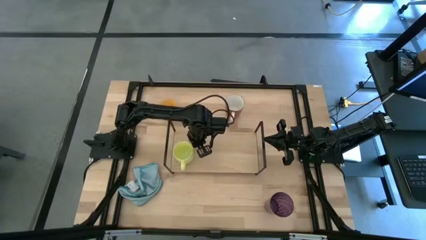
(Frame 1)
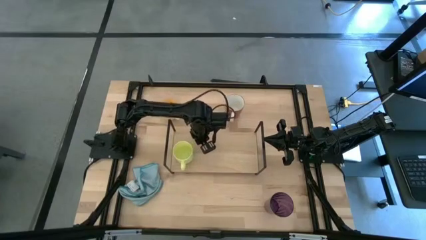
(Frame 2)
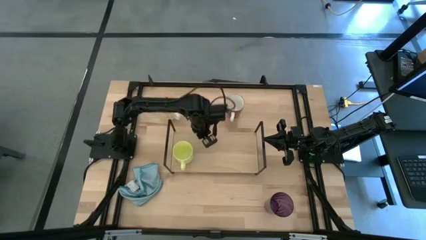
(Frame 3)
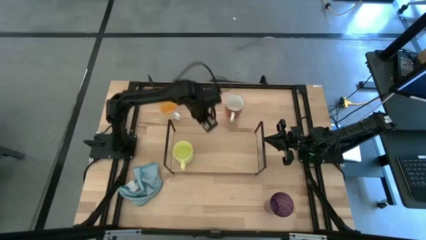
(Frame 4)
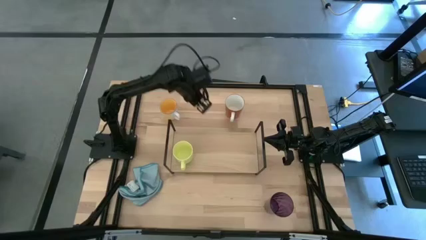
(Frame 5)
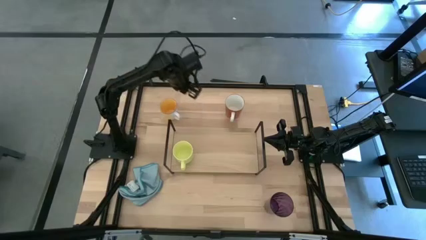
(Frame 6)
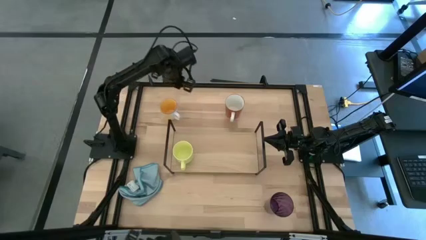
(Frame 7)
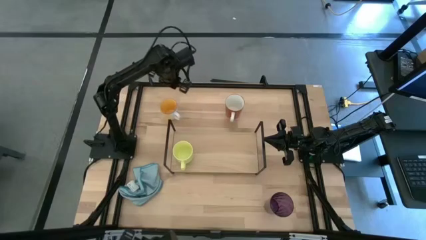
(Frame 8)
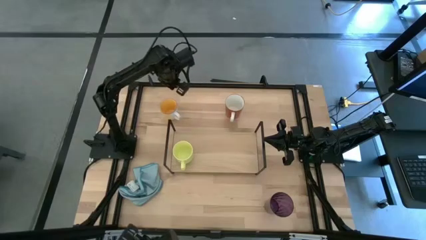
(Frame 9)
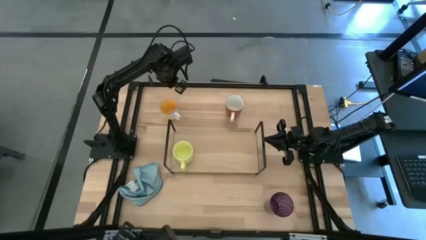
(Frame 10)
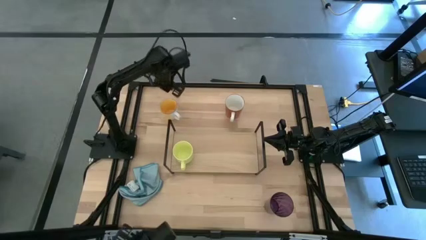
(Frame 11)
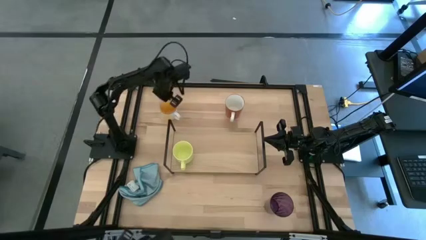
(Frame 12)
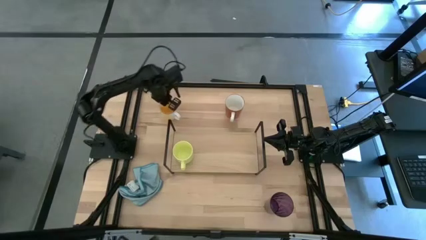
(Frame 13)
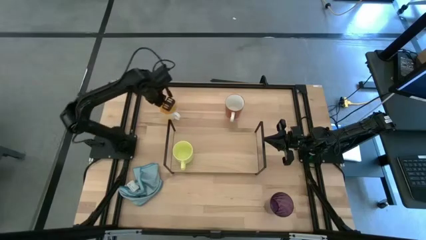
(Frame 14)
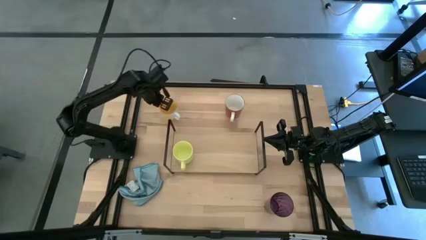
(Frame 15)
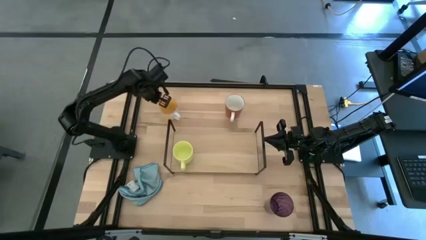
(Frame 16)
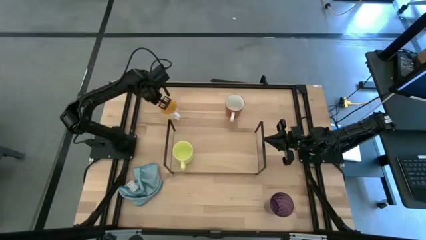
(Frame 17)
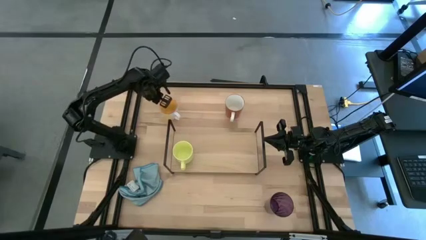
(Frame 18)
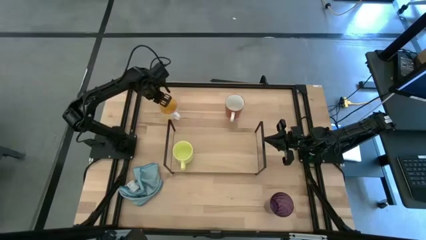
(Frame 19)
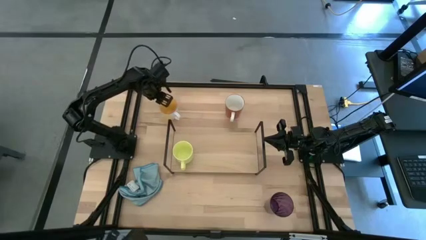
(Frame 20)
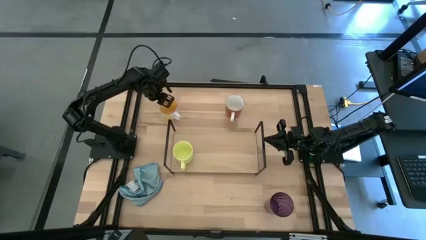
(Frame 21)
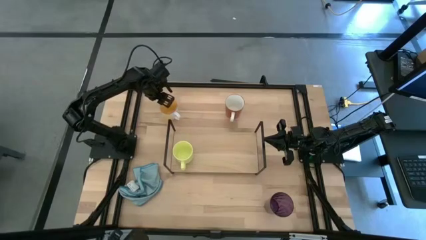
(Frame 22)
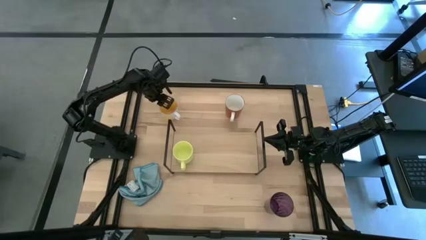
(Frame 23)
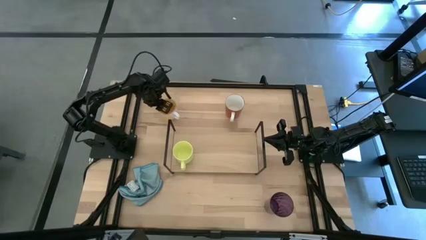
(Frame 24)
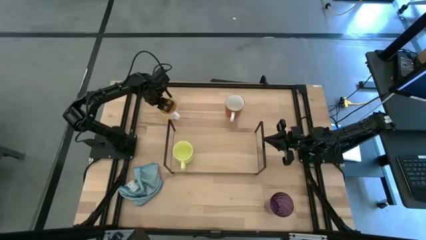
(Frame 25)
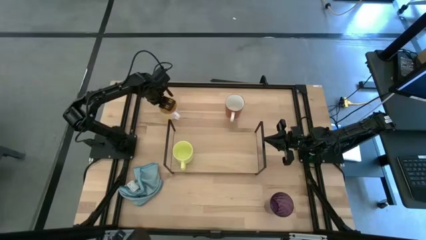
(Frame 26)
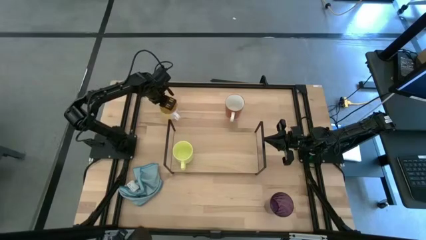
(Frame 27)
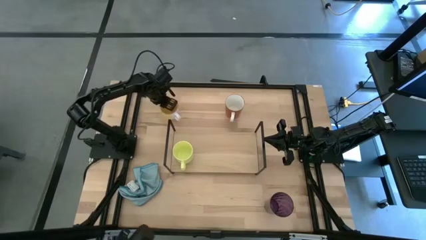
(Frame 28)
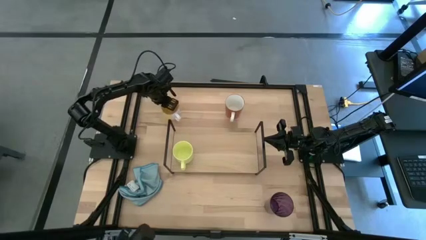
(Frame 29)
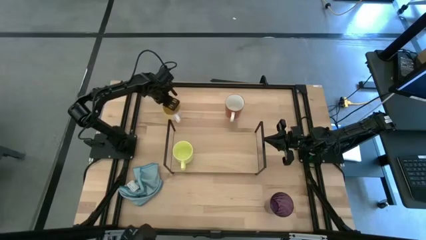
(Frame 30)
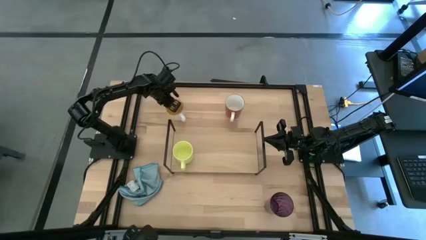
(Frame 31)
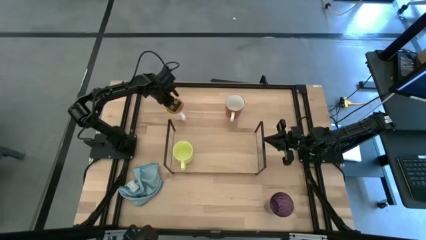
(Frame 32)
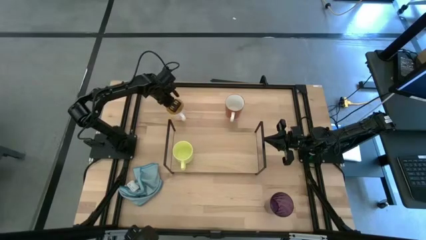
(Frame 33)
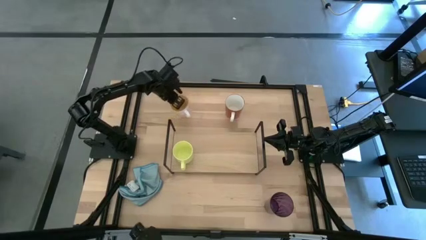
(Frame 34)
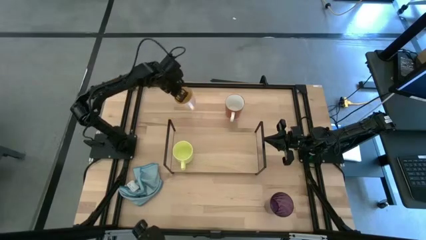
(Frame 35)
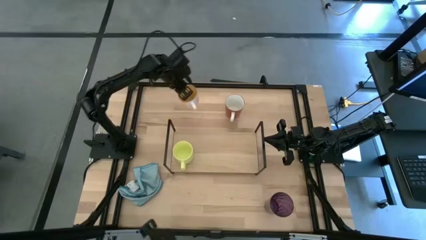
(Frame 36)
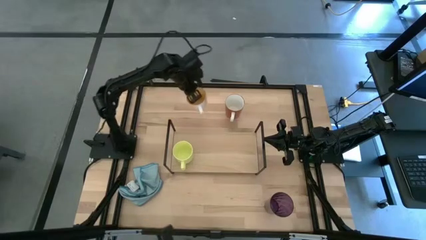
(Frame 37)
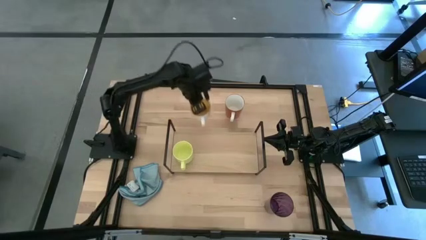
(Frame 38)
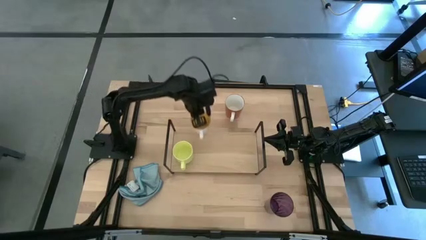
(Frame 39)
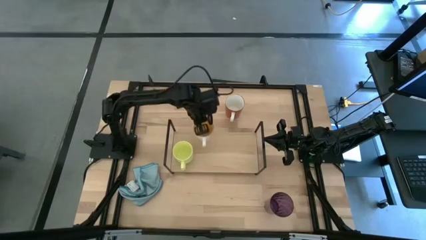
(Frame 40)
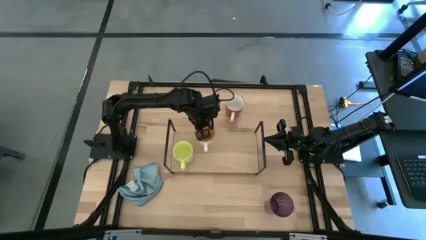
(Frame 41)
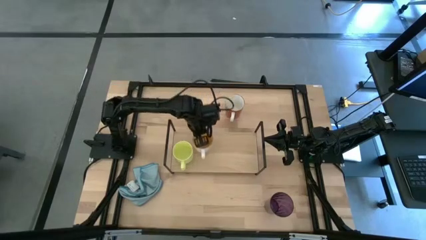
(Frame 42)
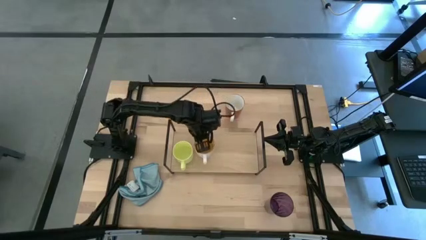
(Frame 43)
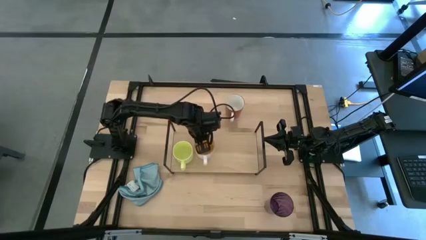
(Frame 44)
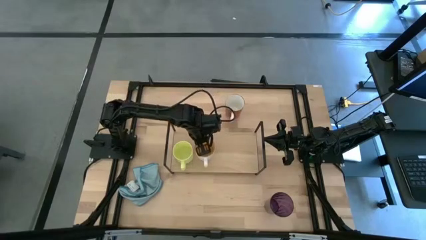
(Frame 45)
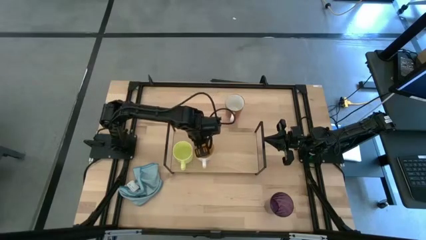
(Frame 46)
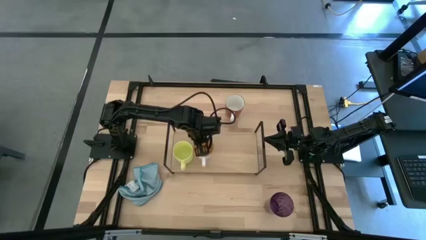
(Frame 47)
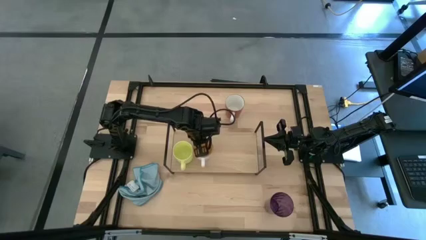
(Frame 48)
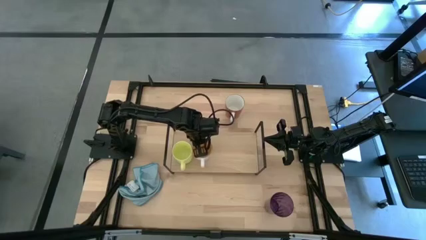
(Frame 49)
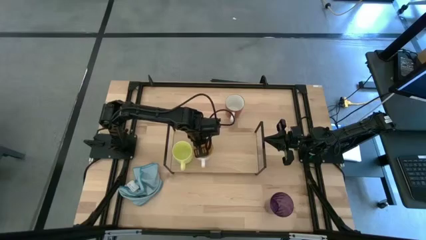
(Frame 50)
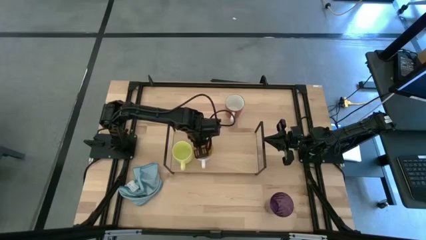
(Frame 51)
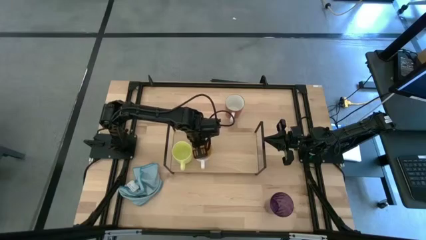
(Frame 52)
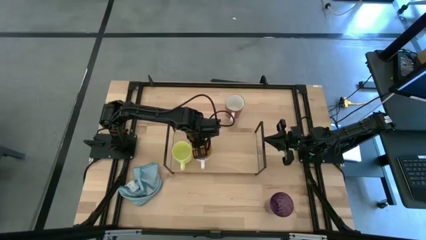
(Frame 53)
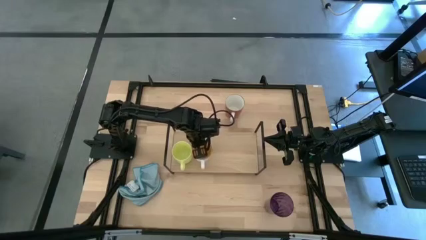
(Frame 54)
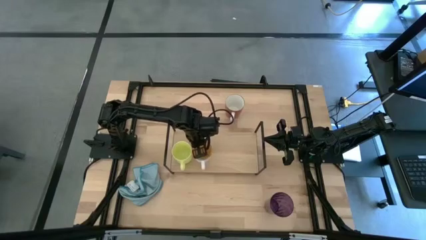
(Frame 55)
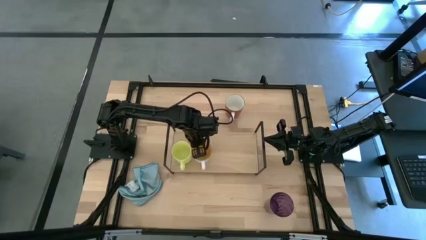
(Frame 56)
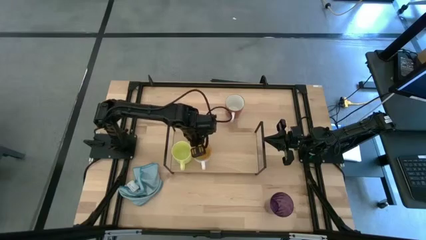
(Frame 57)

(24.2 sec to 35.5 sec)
Task: Stack small to large cups/mugs on shelf
Put the yellow cup on the shelf

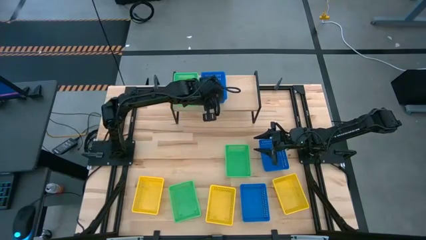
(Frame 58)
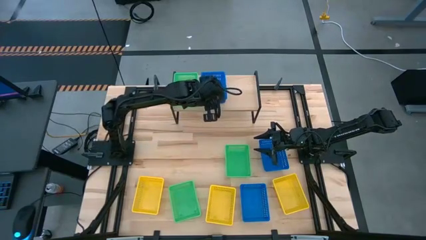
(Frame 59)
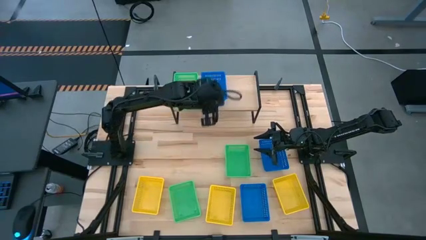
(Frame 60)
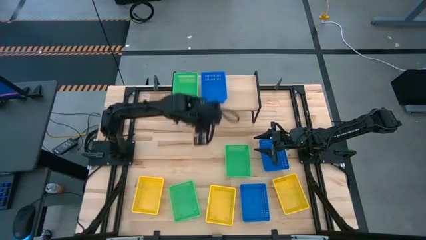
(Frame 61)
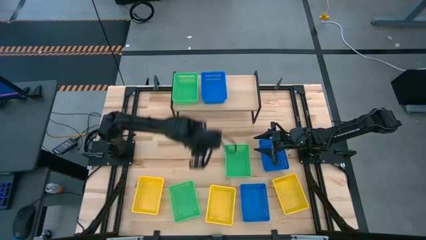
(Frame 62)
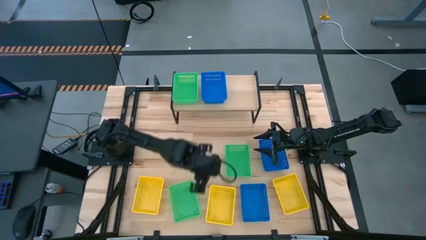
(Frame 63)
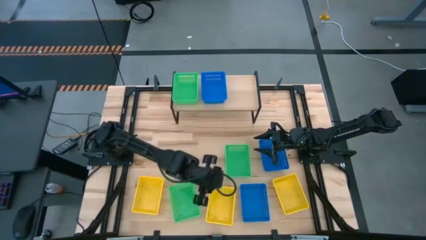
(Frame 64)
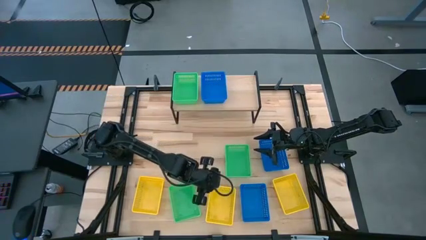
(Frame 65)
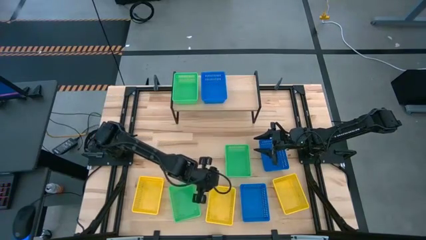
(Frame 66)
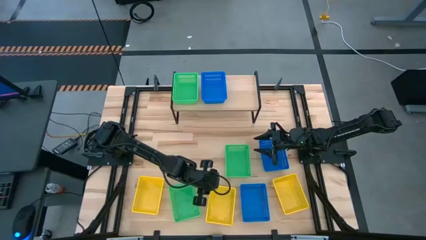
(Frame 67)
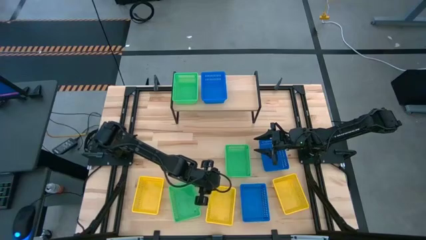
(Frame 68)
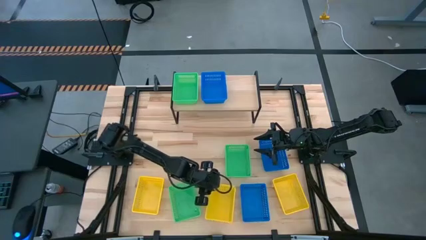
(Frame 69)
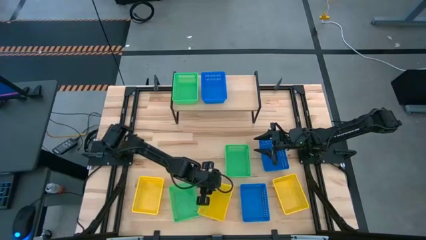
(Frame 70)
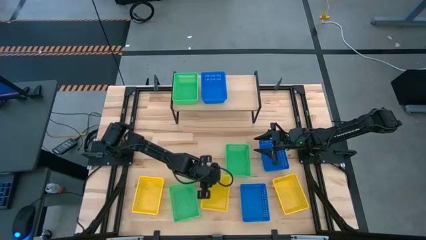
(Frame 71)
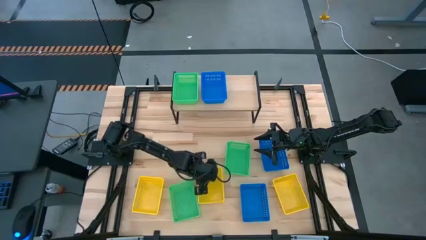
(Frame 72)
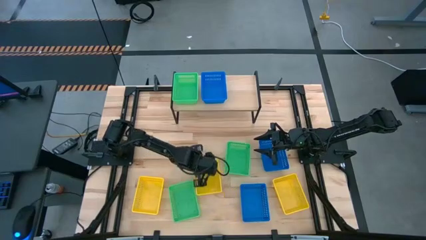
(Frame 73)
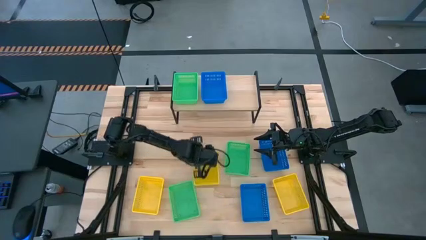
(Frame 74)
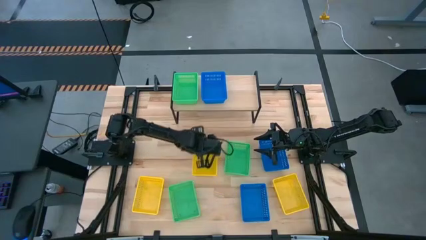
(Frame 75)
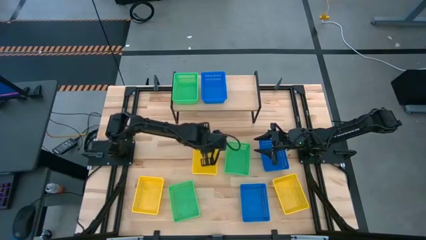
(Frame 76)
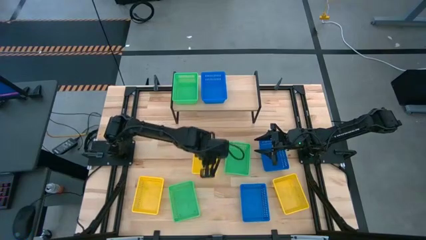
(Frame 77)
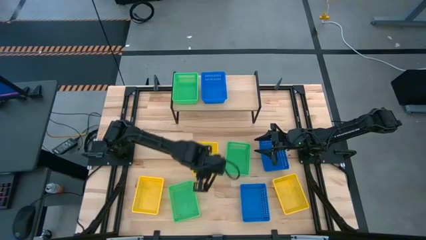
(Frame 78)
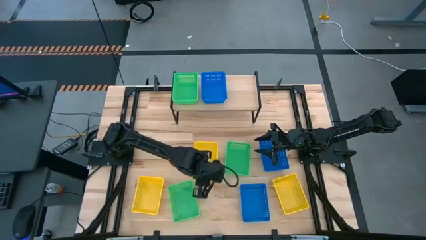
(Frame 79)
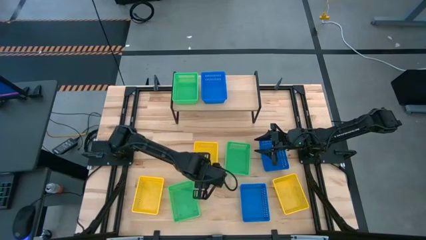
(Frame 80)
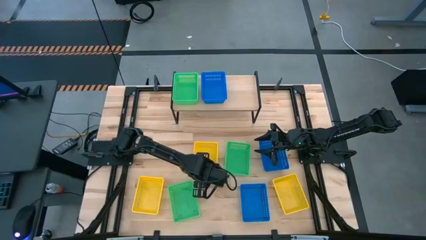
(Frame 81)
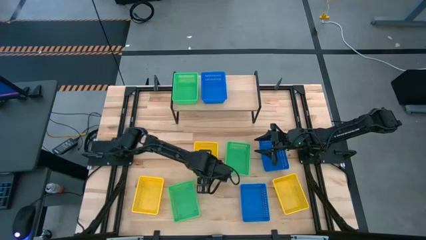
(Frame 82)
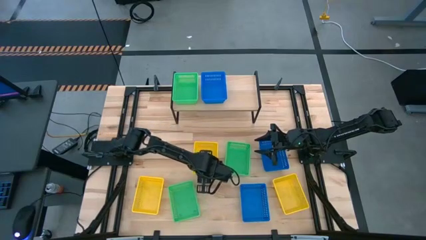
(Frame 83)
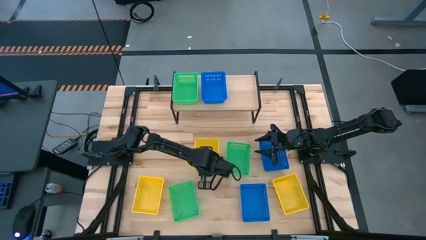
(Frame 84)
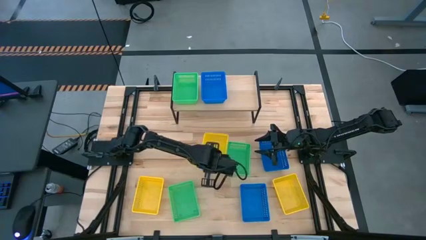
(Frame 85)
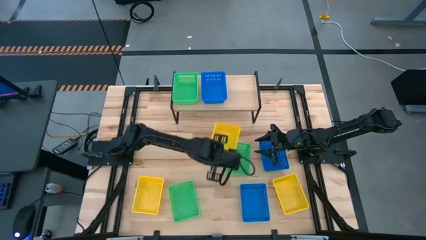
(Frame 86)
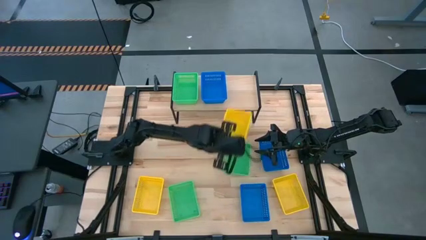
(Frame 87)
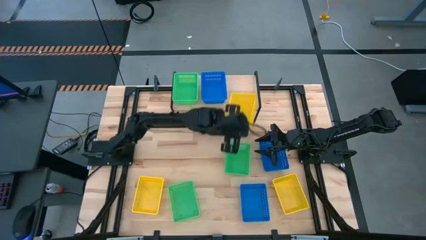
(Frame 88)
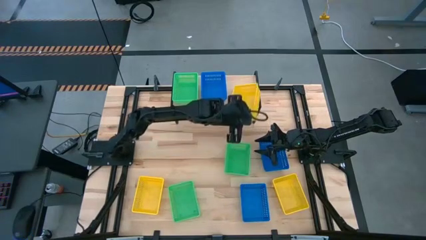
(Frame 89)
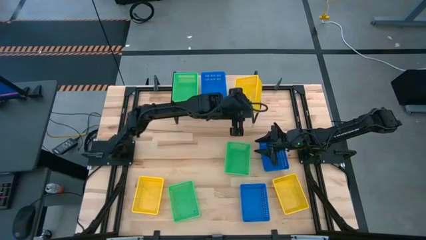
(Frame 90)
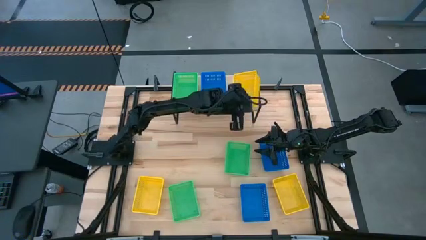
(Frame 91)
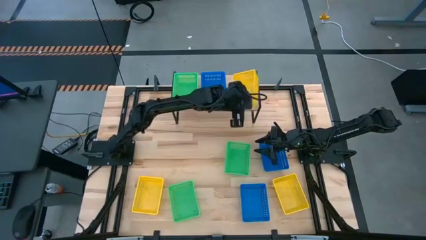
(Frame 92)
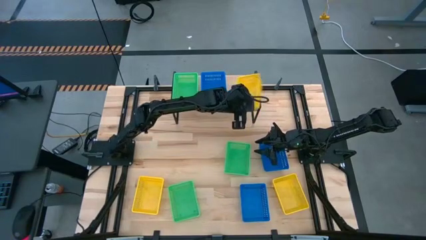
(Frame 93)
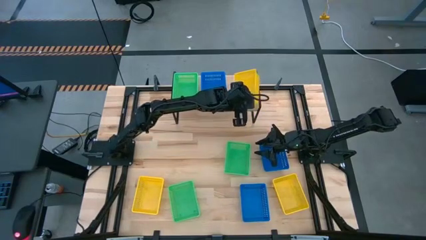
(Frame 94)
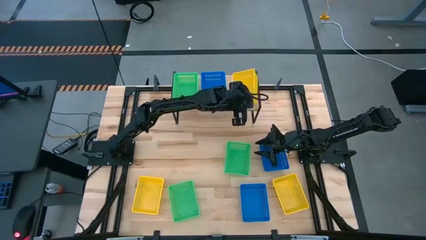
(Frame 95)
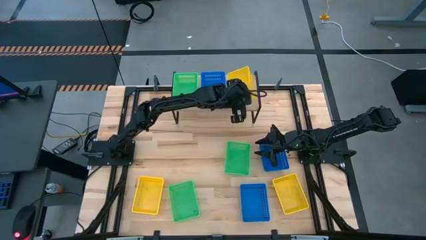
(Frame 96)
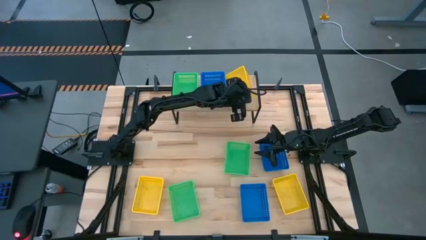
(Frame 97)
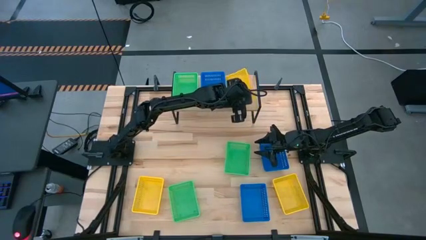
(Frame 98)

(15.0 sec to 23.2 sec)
Task: Stack baskets on shelf by color
Put the middle yellow bin on the shelf
